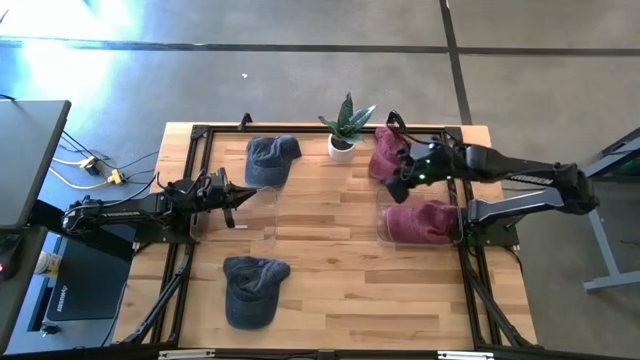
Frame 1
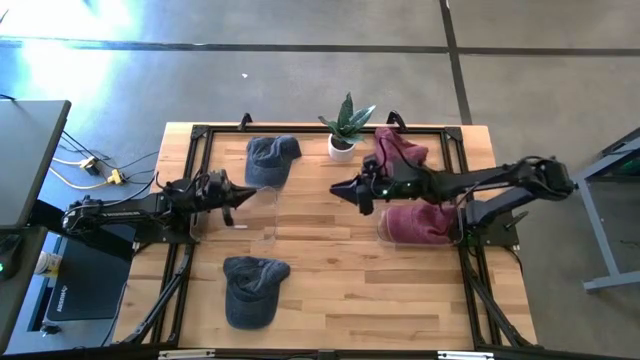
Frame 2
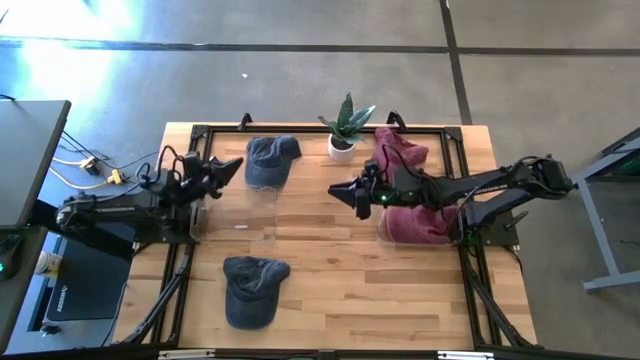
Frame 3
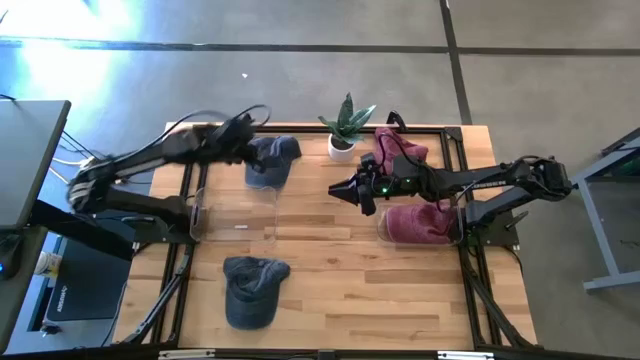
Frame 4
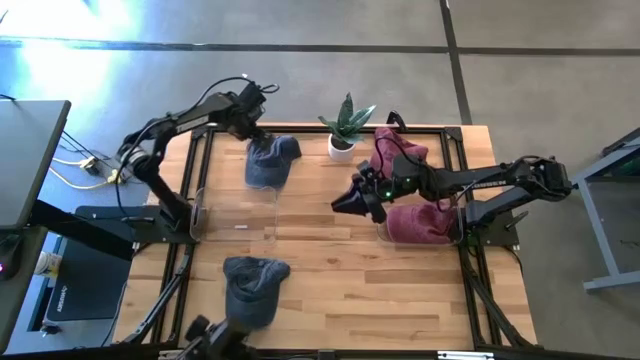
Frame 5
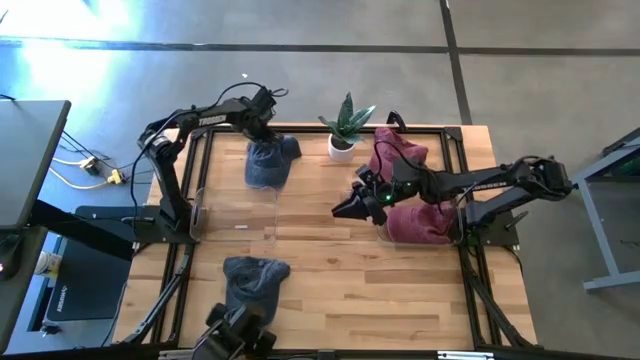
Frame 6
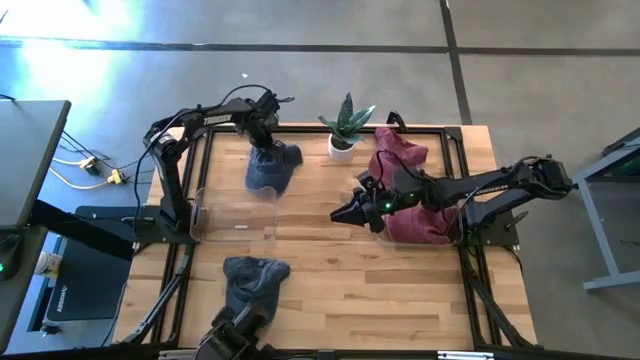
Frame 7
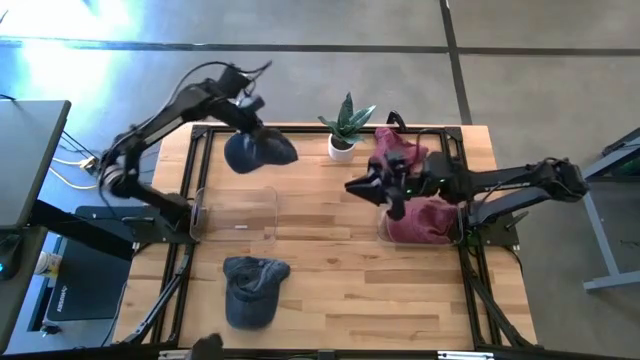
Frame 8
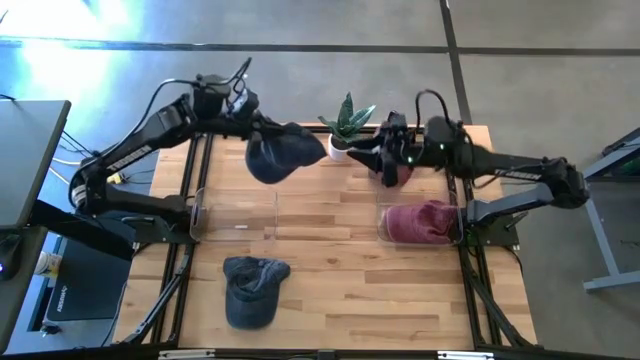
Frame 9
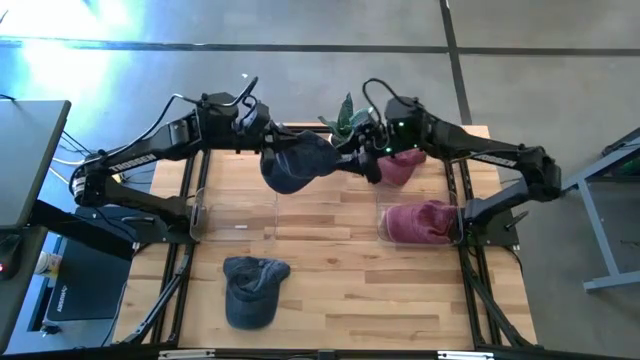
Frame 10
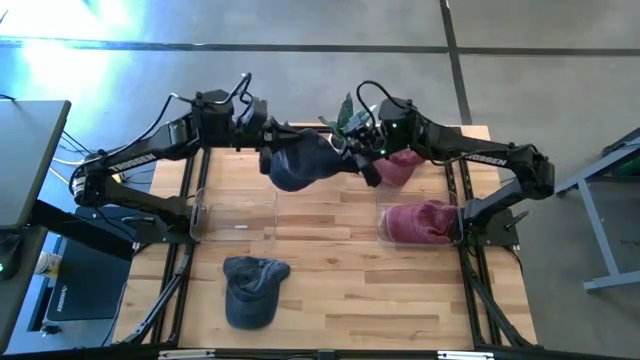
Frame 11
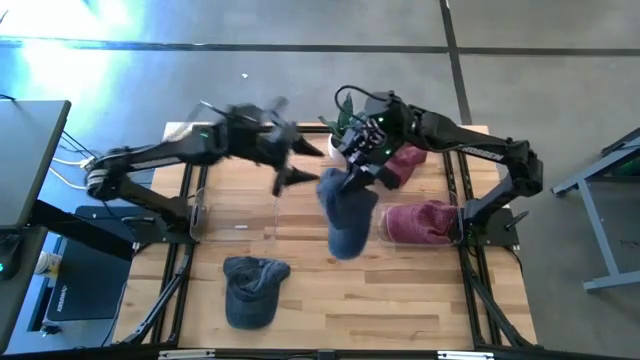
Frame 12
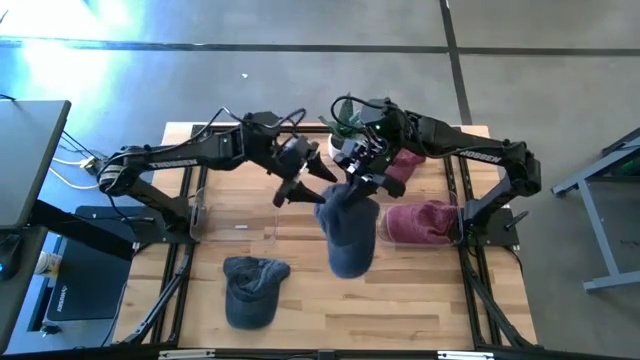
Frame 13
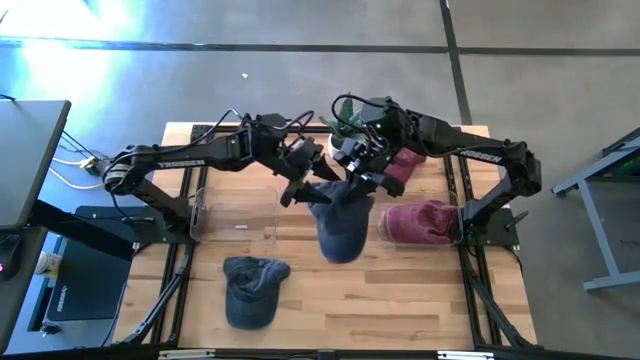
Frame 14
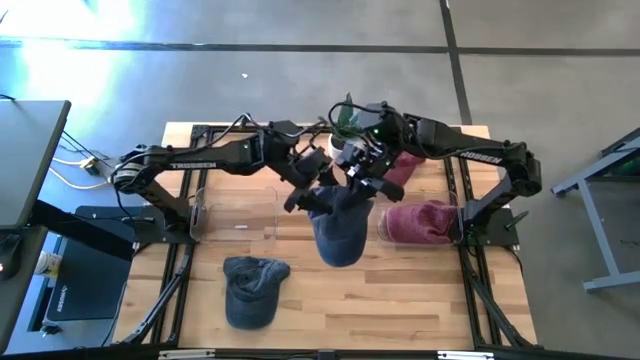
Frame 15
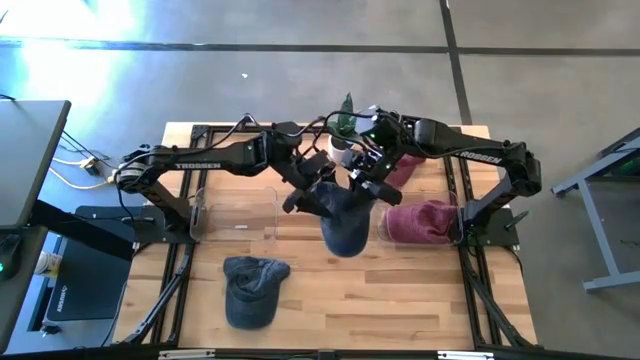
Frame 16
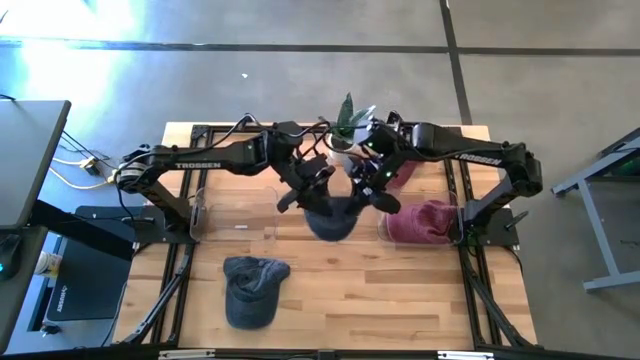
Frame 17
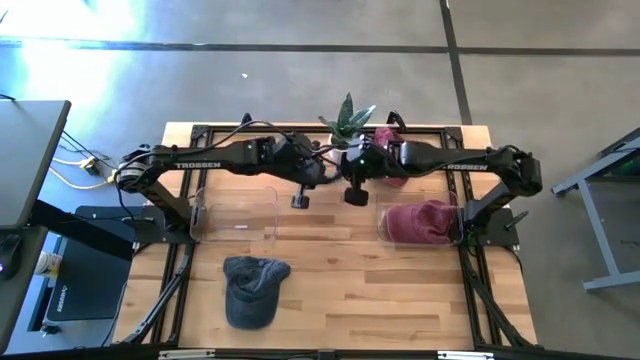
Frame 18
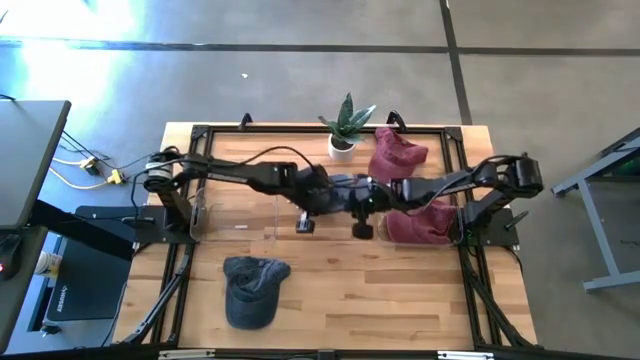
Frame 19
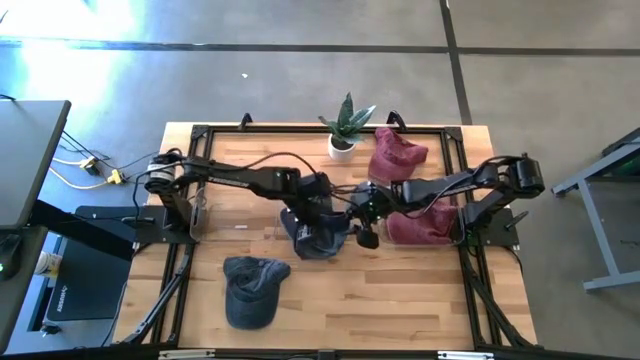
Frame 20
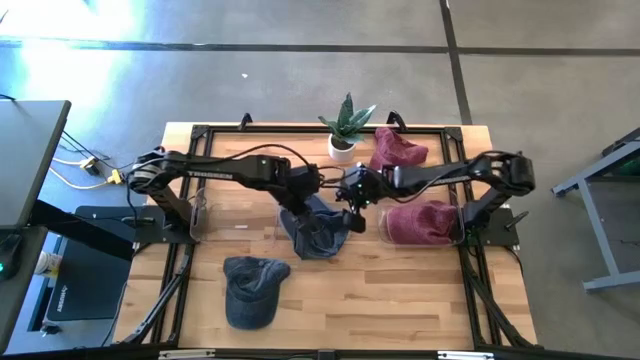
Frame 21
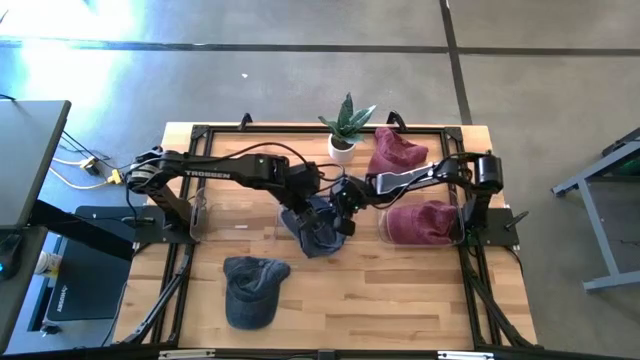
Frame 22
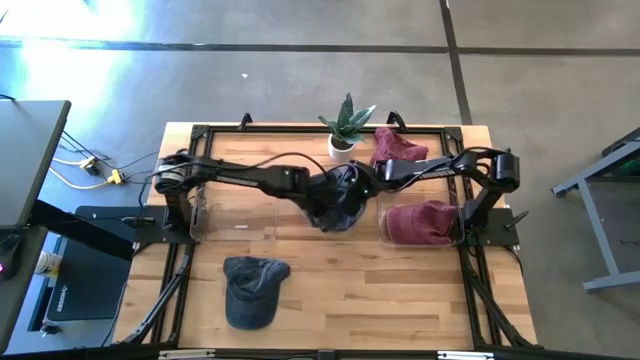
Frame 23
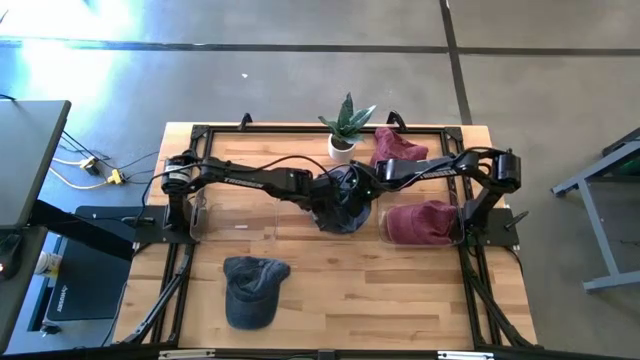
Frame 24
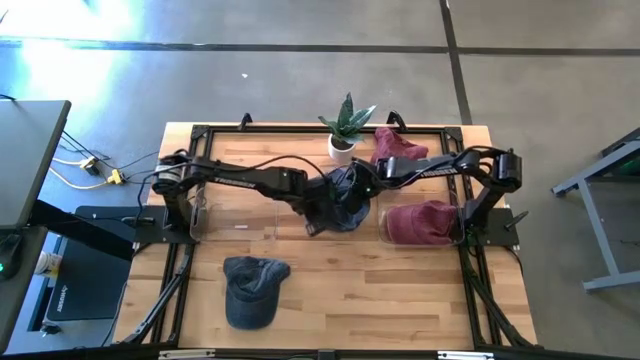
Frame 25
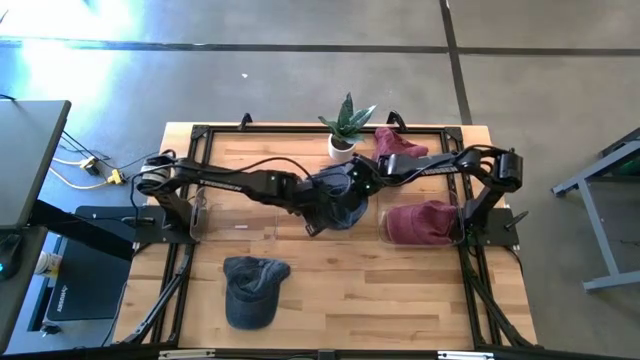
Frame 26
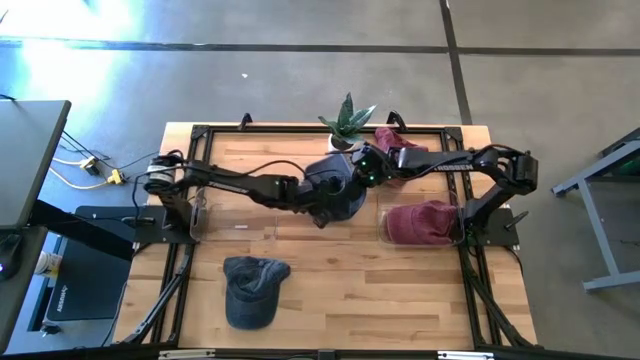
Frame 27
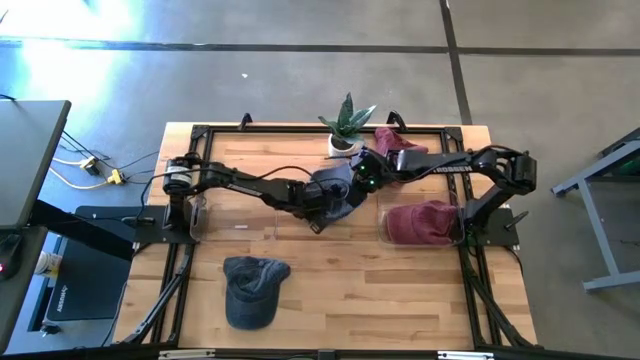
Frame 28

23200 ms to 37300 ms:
Task: Pick & Place hat
Put the top blue cap into the left transparent bin

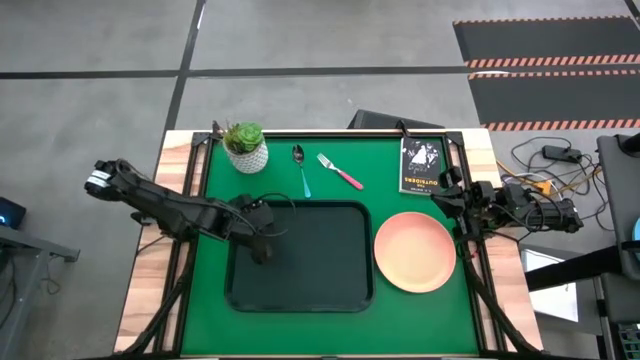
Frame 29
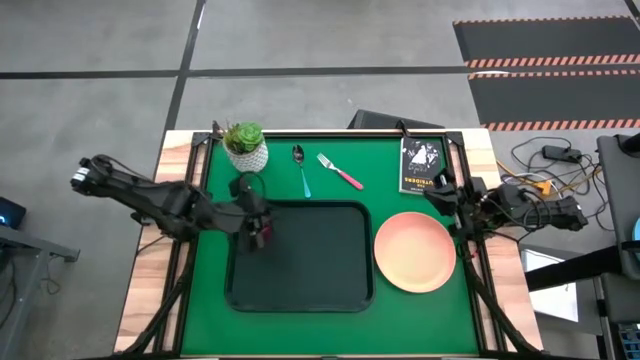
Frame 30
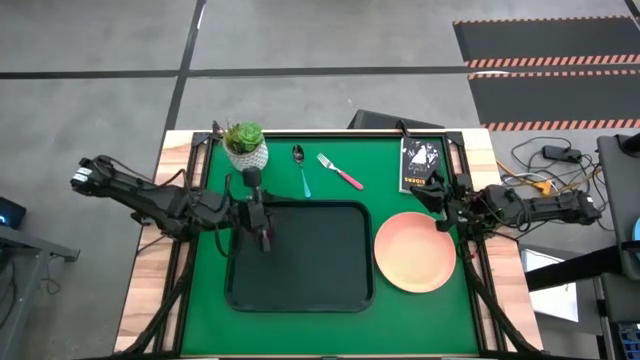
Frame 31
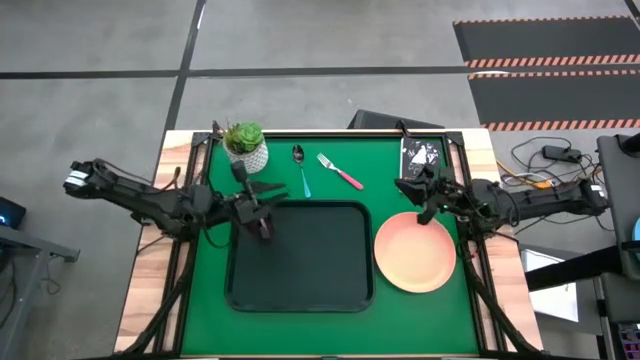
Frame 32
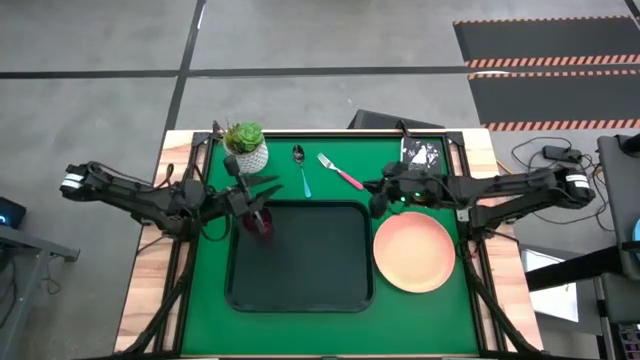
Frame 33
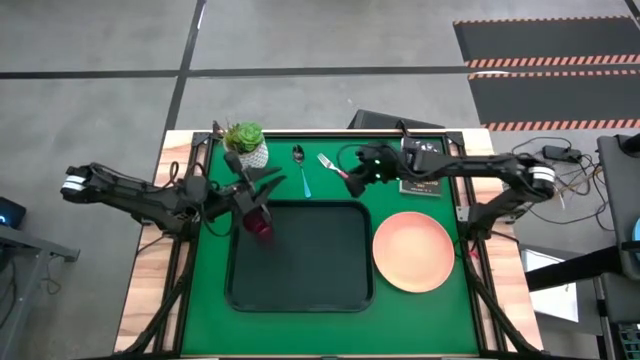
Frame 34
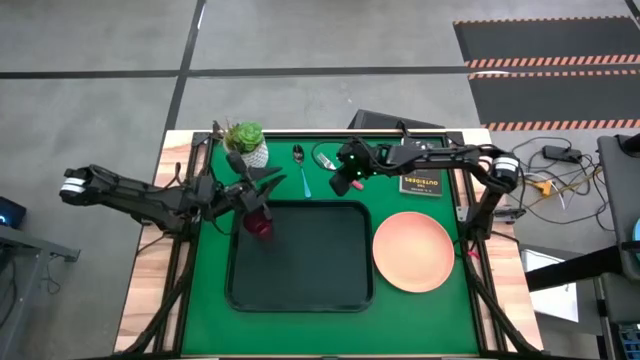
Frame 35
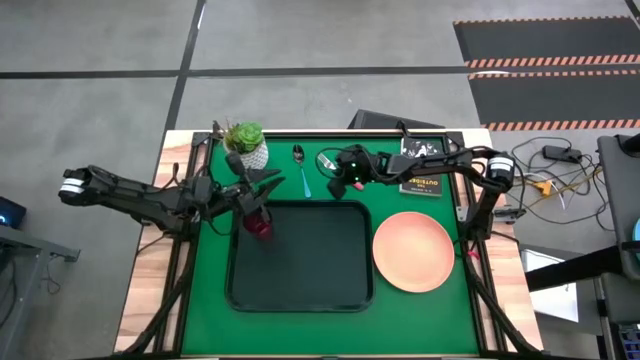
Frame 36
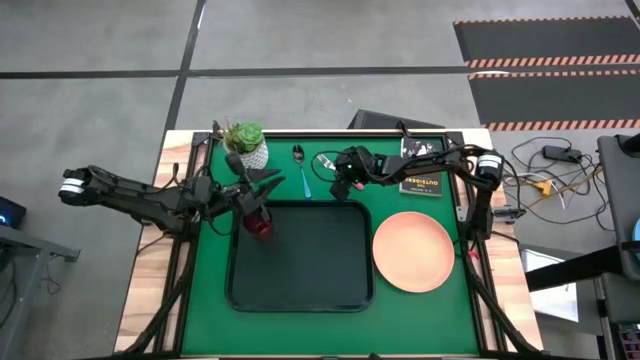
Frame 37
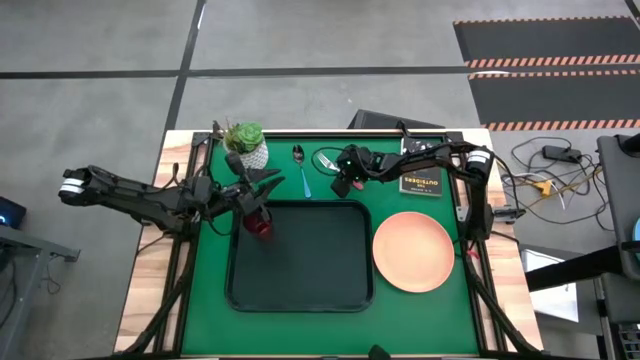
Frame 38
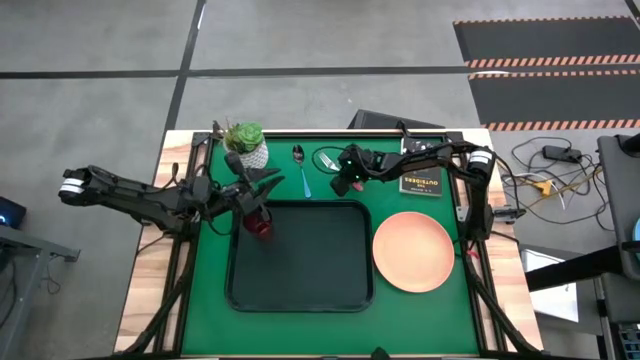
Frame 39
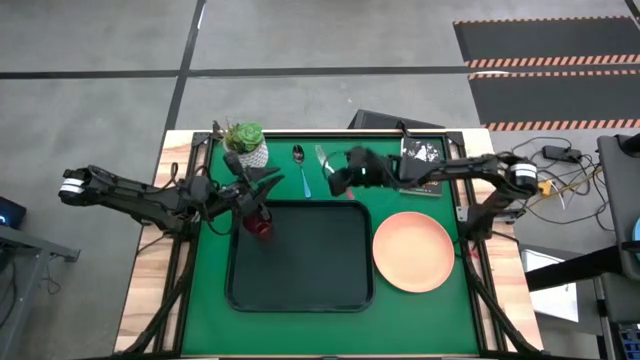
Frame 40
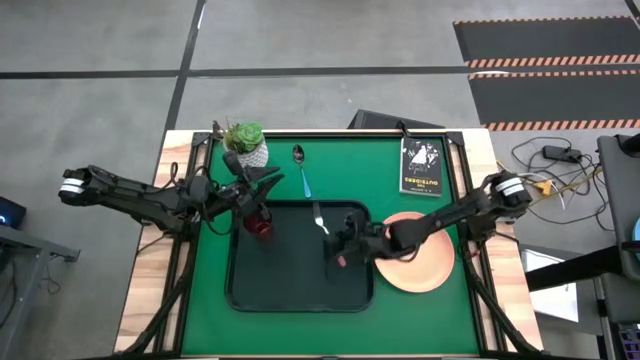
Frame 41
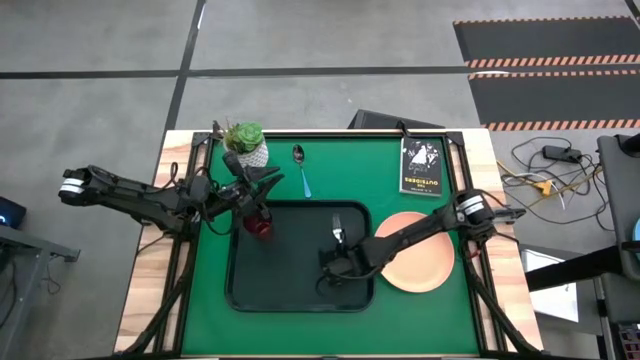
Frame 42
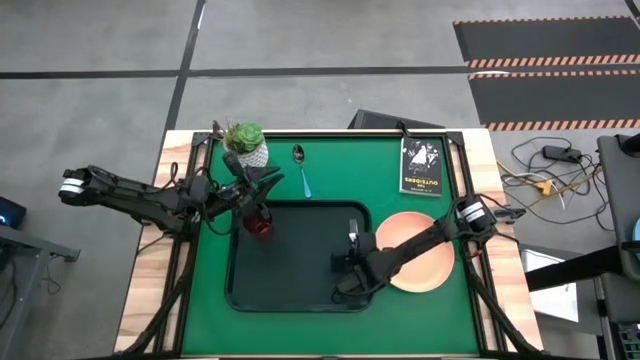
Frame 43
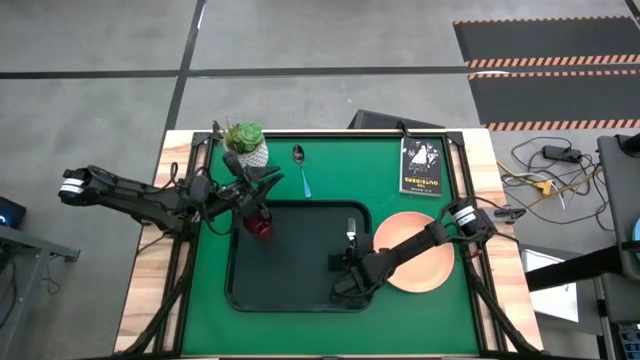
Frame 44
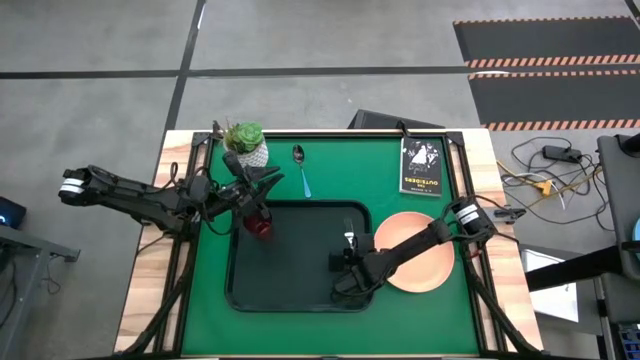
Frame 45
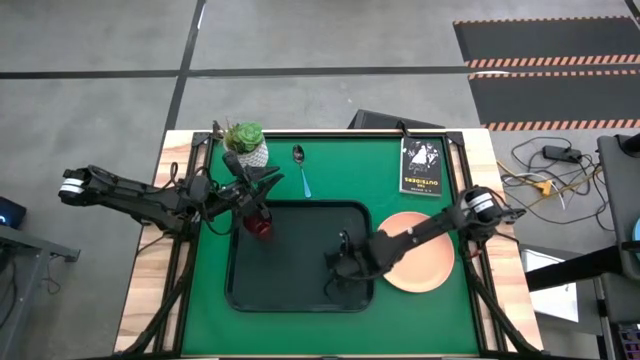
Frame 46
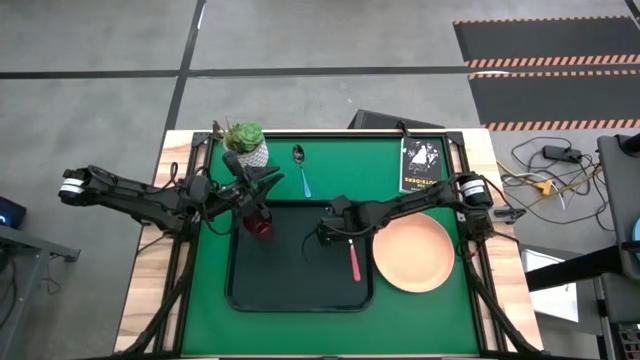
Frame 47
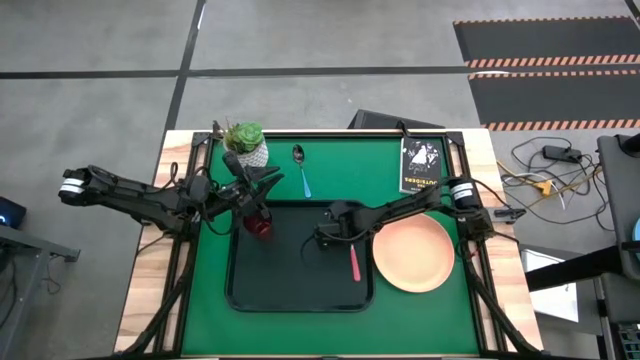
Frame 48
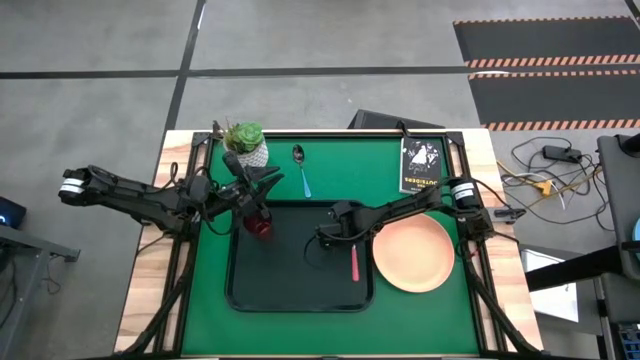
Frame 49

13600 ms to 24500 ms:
Task: Pick and place plate/cup/fork/spoon on tray
Put the pink fork to the middle right on the black tray
